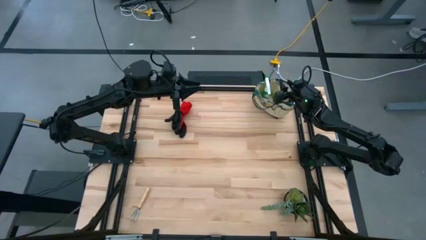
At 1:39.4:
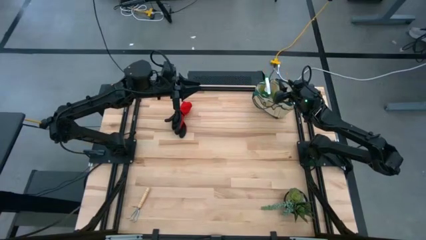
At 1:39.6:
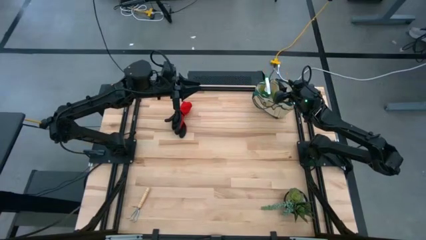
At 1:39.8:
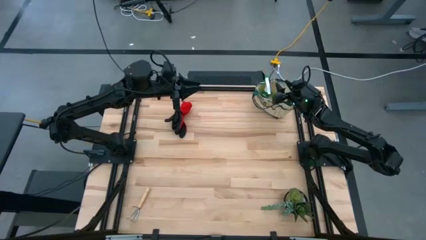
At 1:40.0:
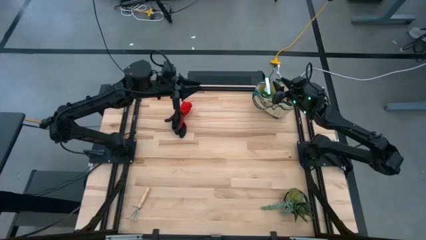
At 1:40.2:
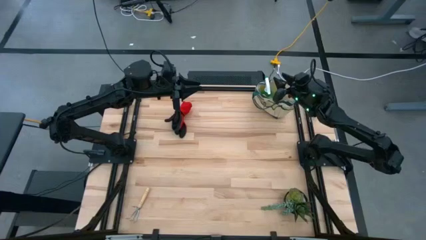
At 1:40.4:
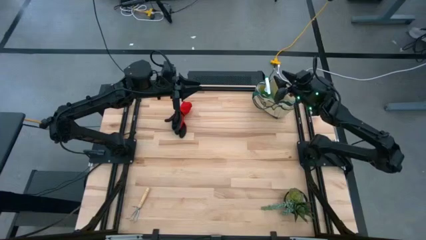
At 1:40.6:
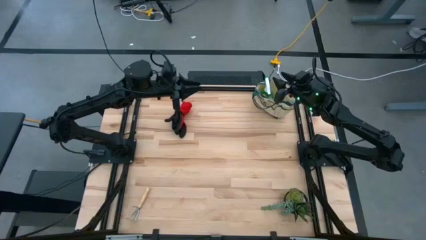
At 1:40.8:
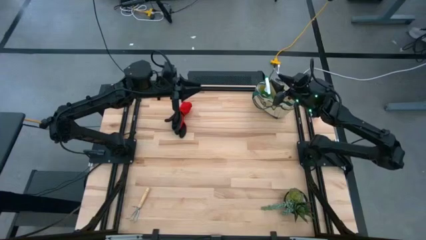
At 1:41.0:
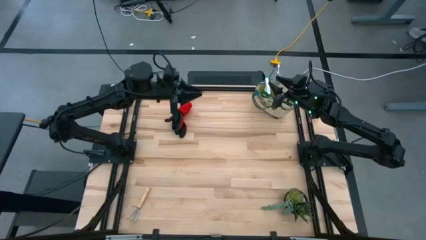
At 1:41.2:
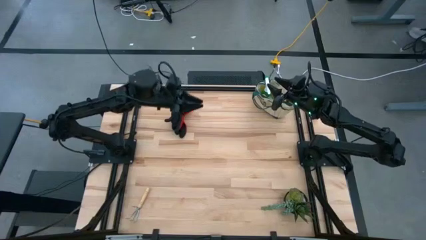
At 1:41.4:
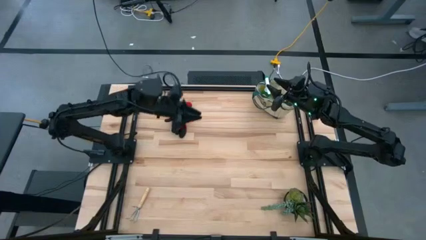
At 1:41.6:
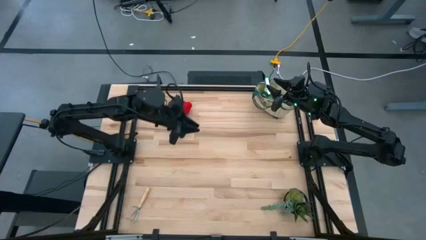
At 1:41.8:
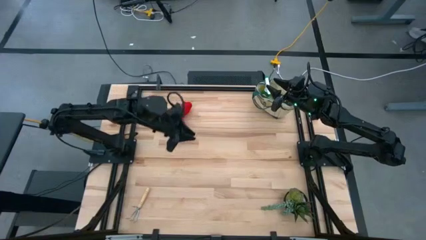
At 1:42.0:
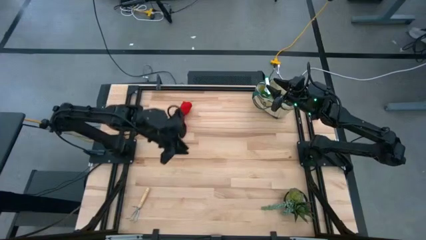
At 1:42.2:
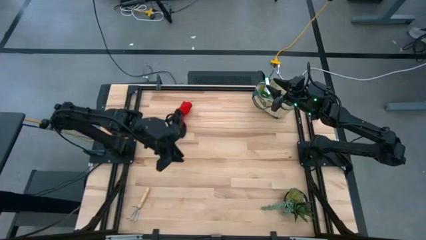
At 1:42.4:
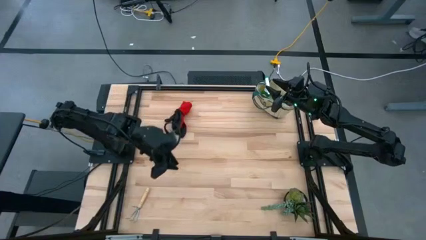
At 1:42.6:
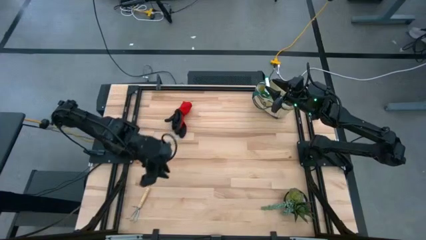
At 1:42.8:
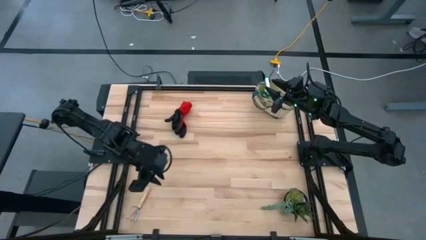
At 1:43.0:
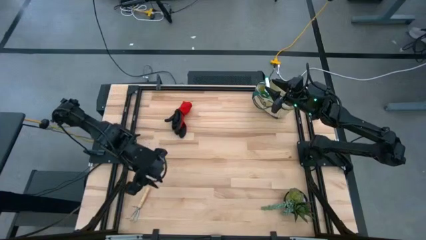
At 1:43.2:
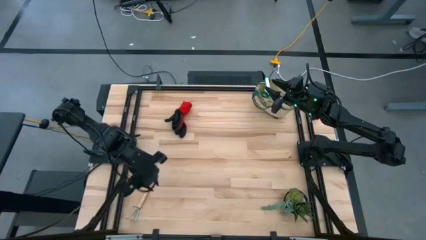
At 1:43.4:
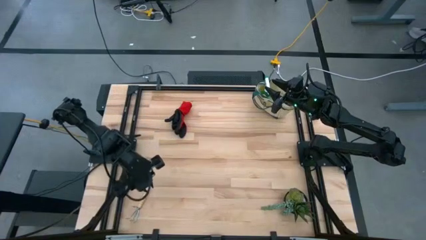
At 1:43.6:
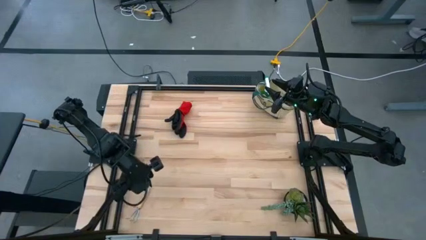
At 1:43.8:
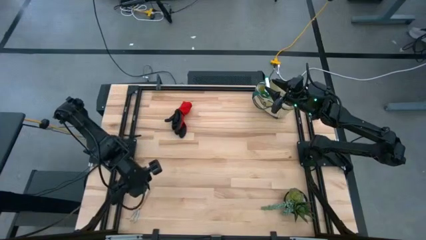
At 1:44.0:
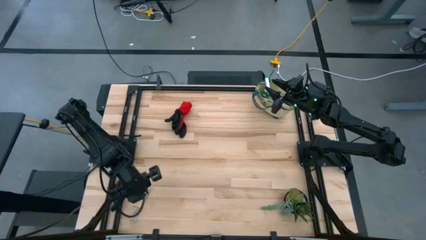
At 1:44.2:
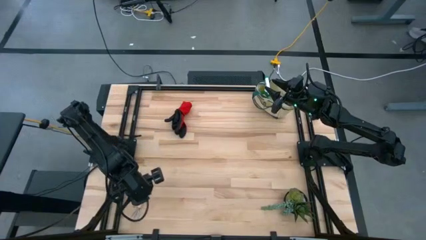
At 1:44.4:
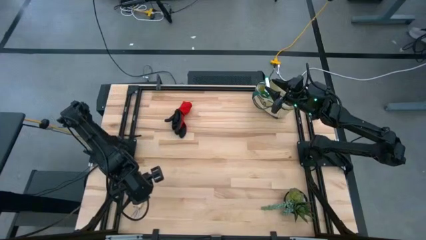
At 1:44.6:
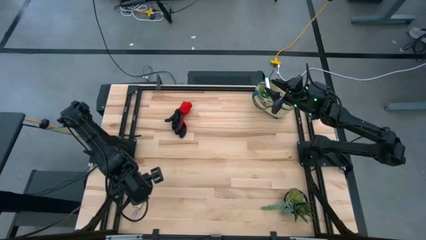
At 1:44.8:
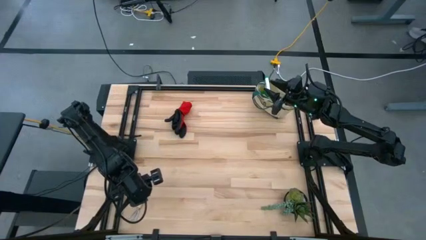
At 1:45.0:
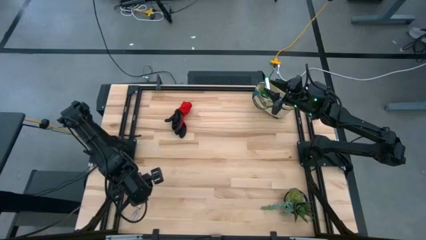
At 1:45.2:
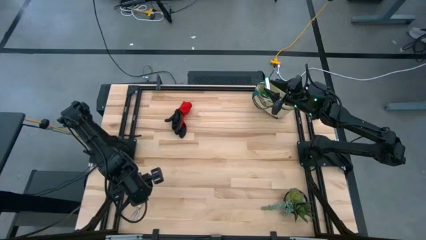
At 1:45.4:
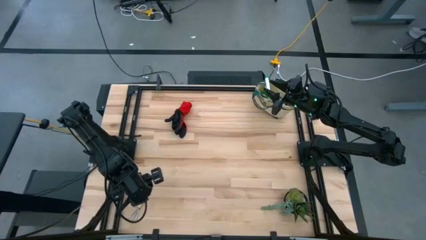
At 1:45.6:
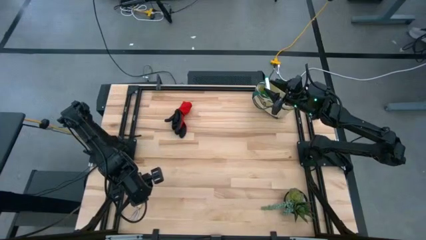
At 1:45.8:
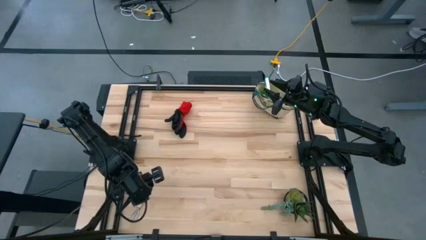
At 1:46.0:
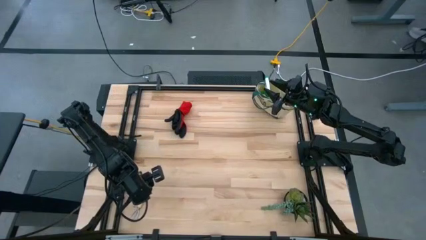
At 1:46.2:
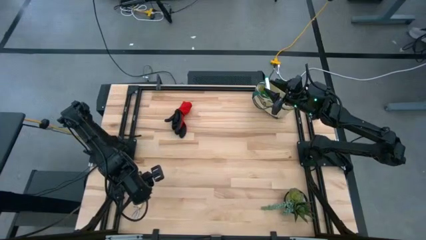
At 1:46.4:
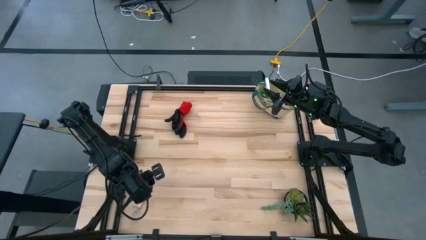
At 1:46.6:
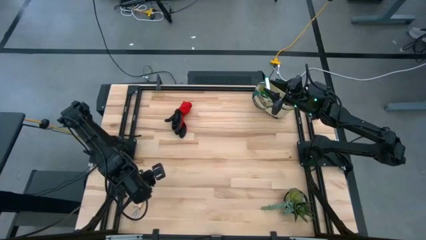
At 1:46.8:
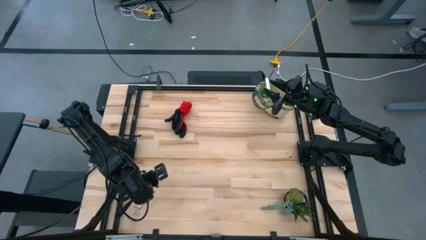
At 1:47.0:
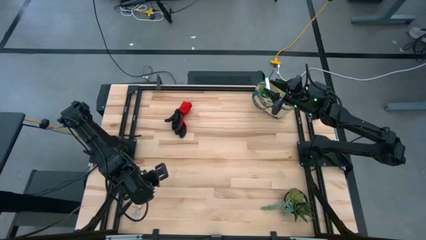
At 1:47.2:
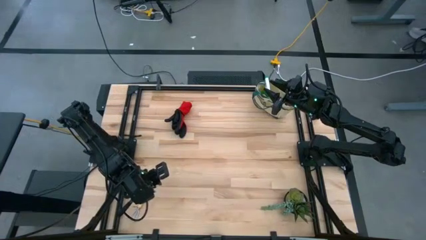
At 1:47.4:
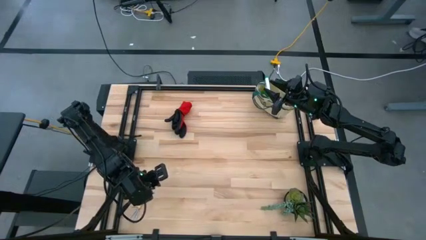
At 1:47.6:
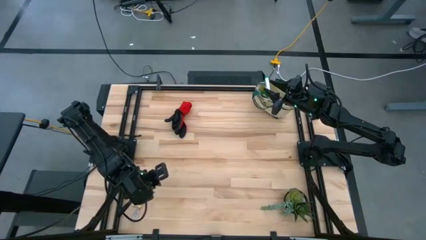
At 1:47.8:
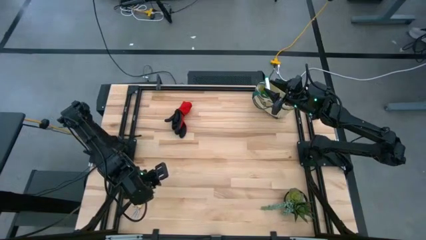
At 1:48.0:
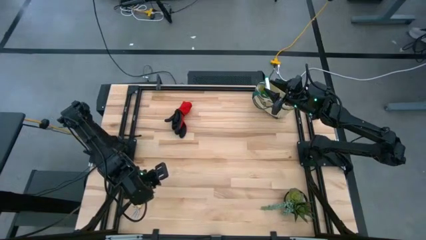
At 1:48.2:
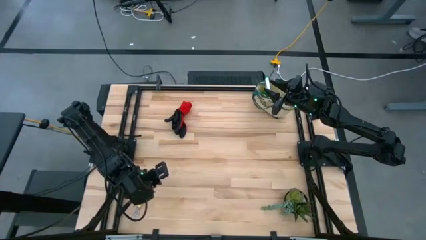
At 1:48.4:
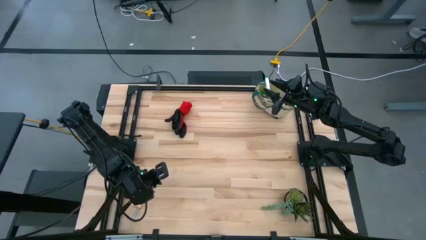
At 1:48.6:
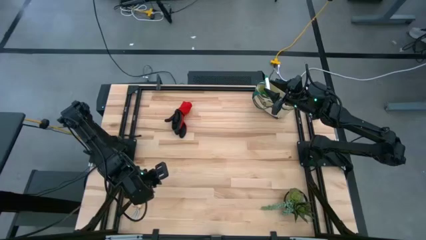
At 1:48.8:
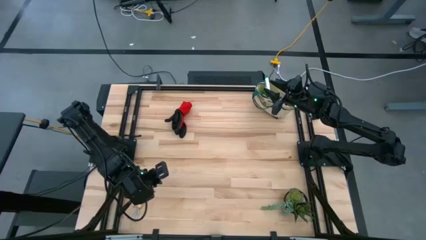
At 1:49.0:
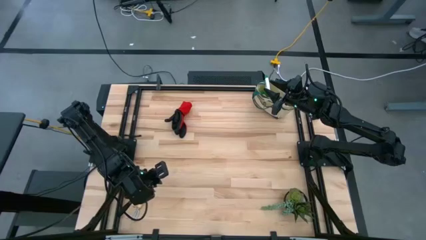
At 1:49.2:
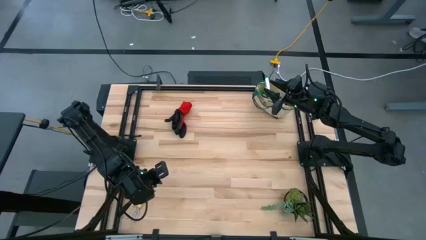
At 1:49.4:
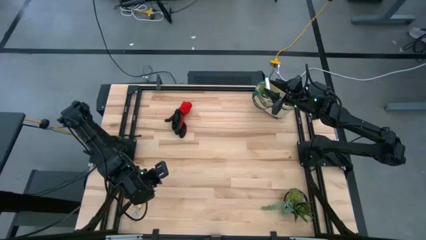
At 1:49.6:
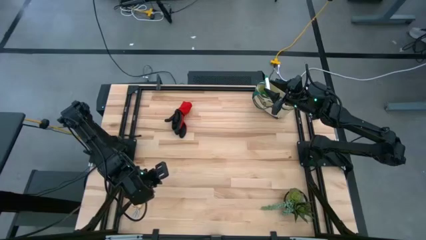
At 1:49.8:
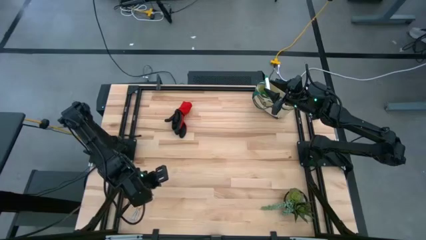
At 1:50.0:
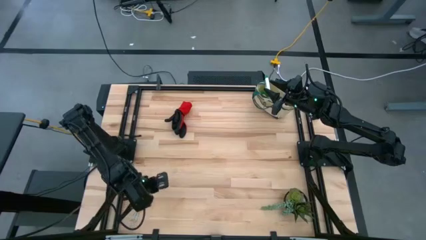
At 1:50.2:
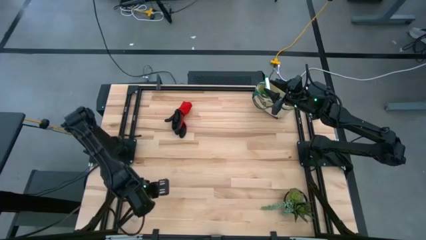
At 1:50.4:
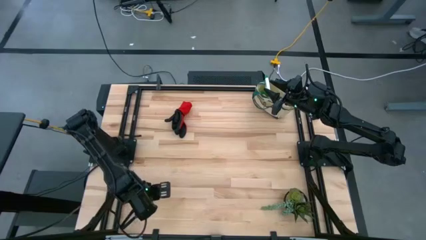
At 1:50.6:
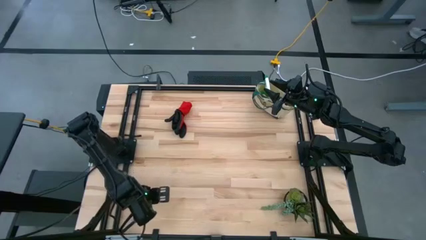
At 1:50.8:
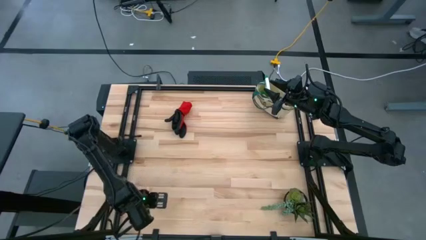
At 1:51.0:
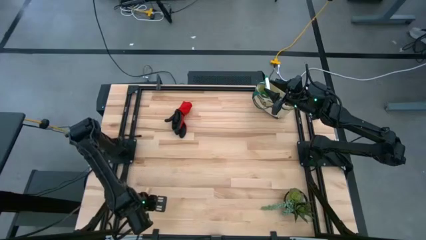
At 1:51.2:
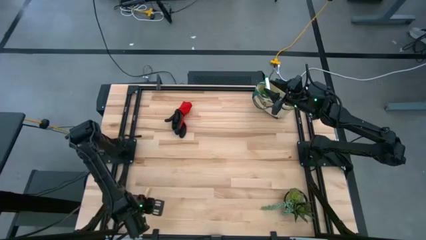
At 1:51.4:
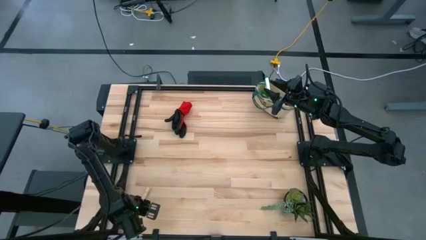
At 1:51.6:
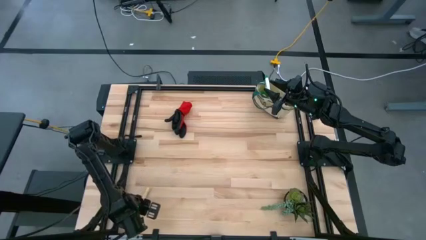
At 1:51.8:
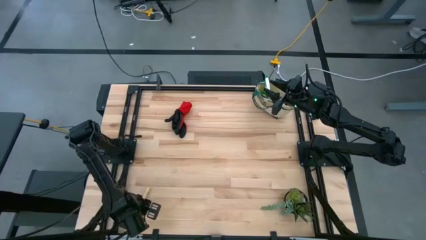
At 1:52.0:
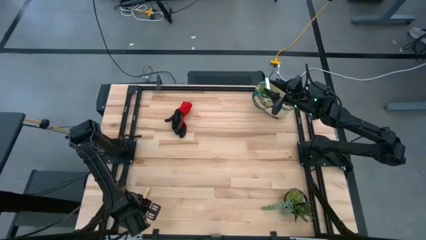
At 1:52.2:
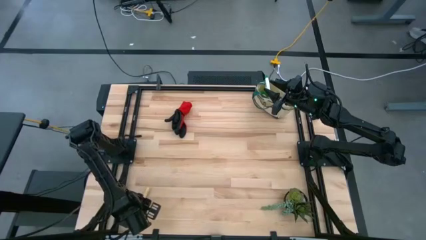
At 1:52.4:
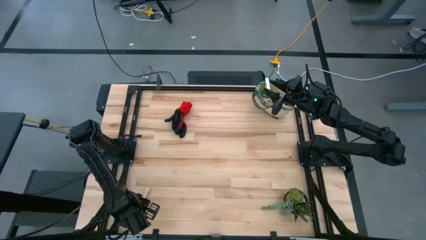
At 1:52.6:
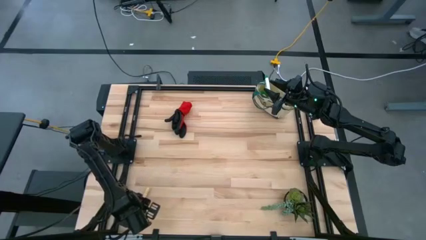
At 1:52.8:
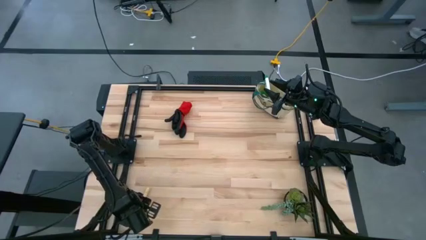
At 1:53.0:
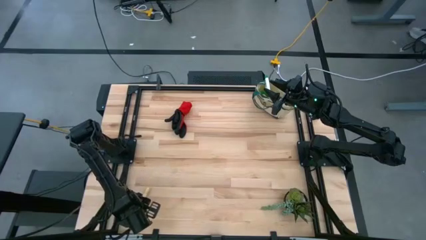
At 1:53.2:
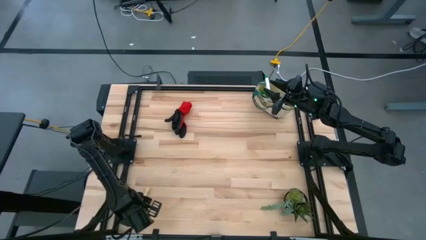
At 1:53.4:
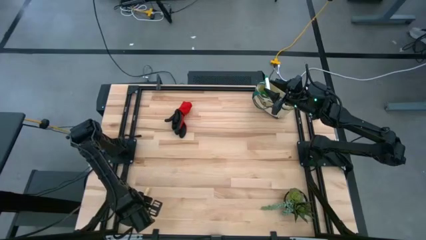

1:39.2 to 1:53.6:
Task: Pick & Place Garden tools in Gardening bag
Put the brown hand rake into the gardening bag

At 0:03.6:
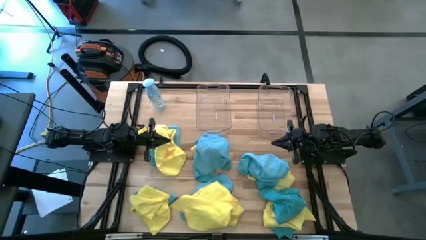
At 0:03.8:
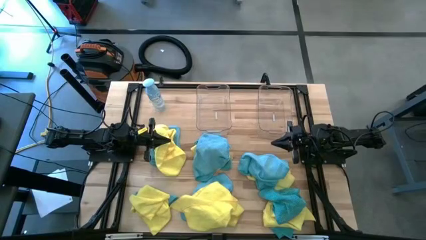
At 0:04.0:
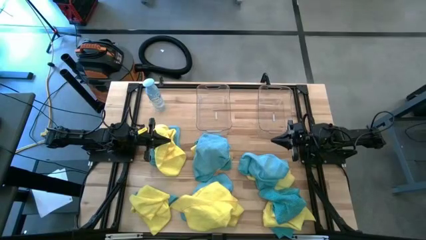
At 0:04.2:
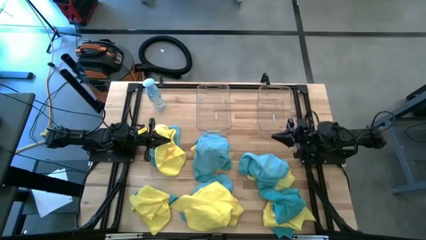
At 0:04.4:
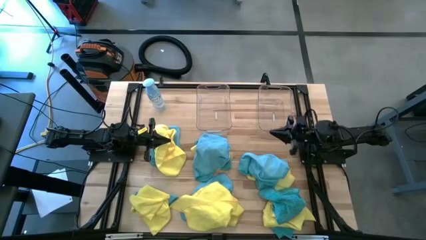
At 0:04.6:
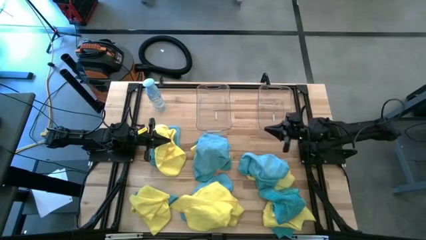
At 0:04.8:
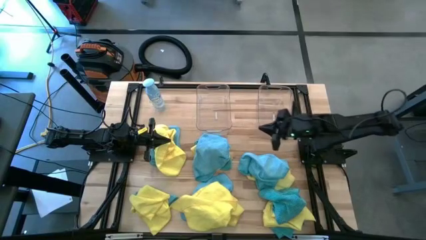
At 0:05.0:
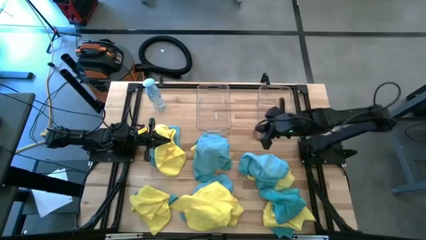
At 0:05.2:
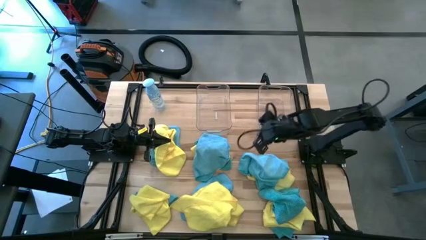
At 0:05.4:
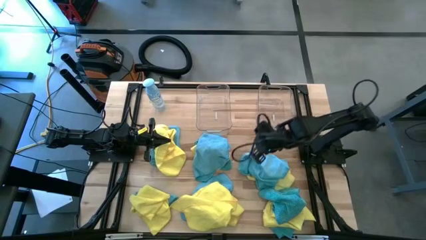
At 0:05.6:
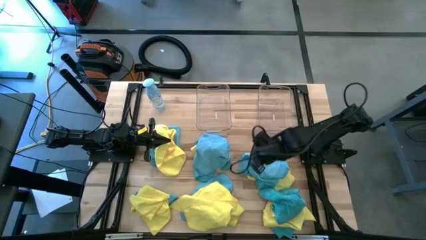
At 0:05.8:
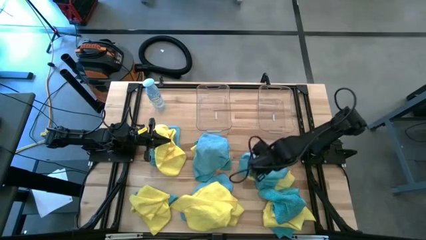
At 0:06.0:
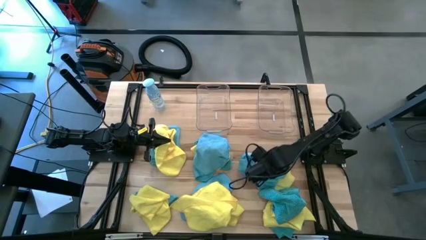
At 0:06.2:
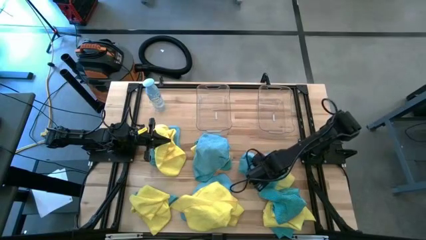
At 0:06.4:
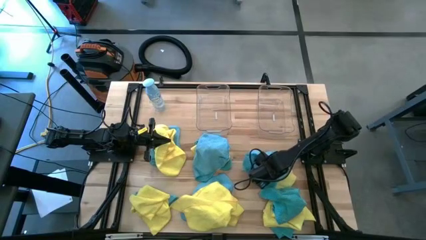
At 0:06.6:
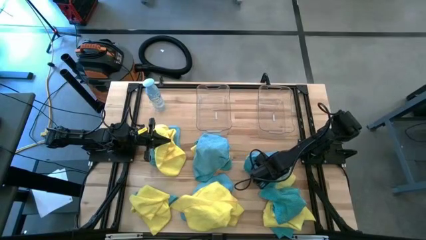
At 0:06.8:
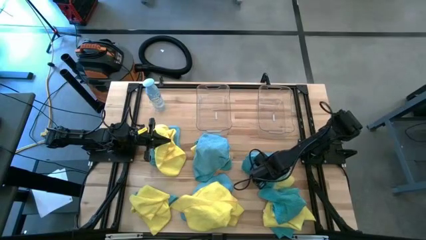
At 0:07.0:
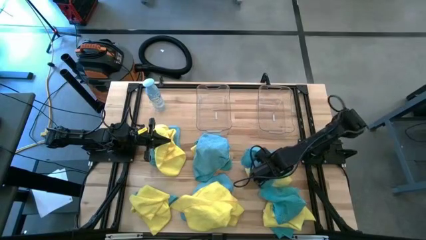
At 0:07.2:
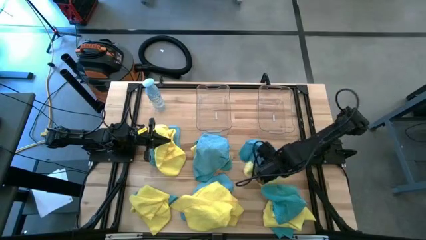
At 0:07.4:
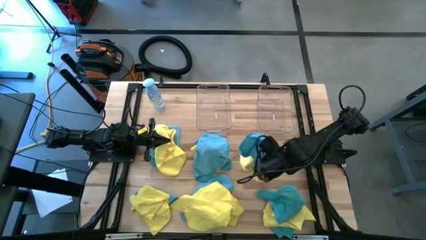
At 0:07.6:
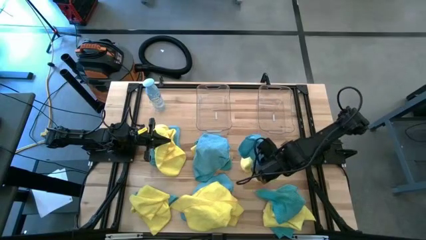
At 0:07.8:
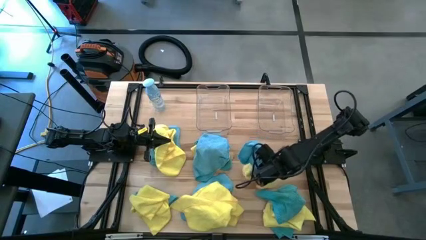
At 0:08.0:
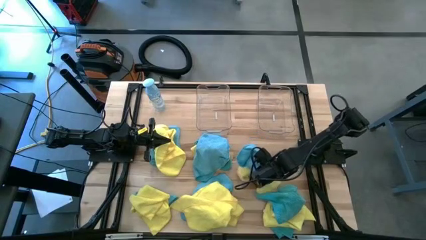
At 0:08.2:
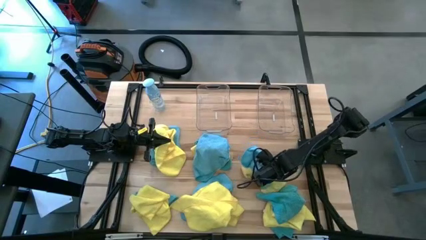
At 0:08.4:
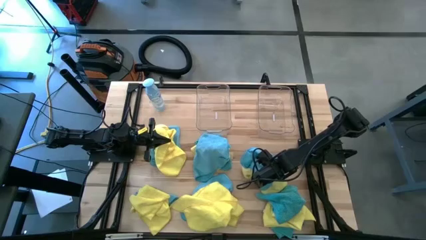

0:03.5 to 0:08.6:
Task: Sort microfiber towel by color & place in baskets
Put the blue towel into the right transparent bin
